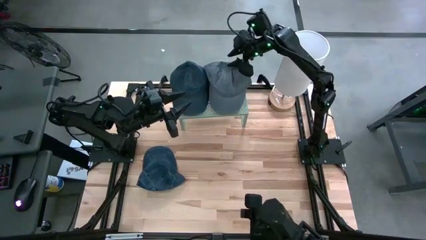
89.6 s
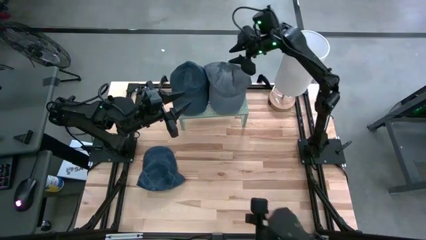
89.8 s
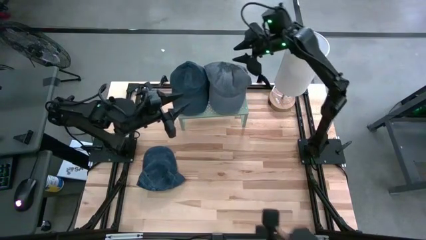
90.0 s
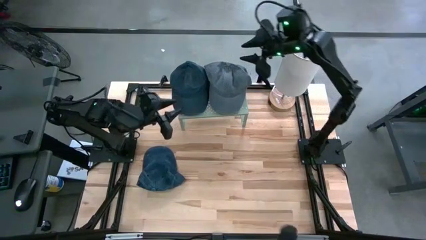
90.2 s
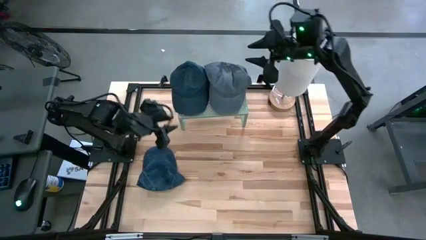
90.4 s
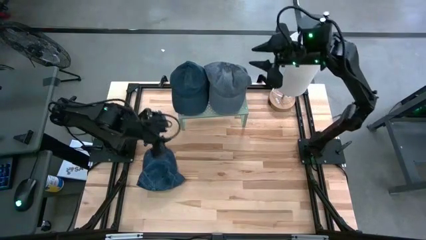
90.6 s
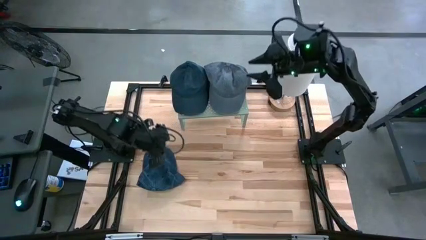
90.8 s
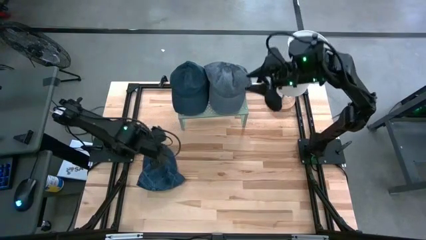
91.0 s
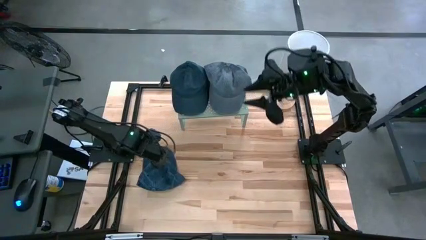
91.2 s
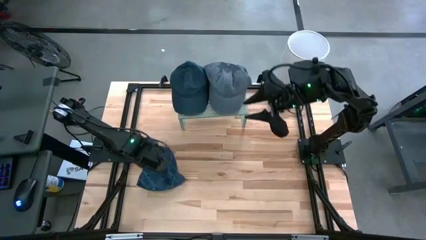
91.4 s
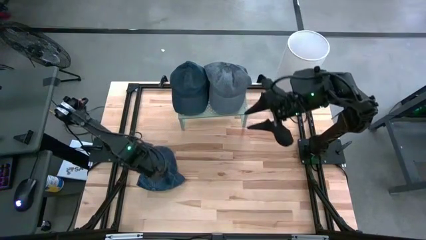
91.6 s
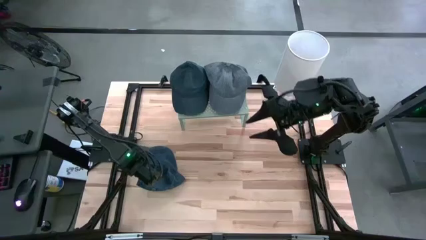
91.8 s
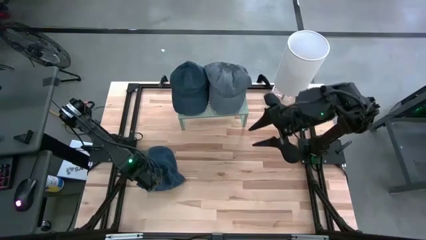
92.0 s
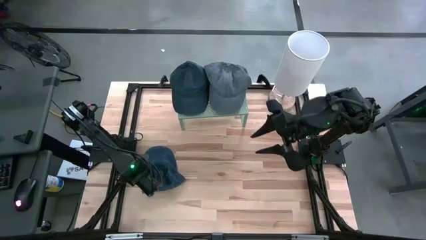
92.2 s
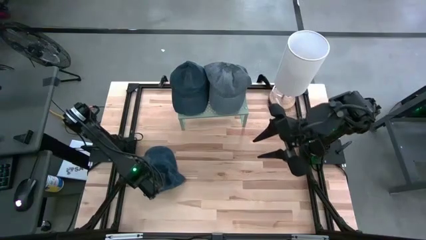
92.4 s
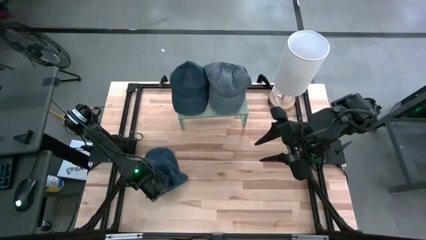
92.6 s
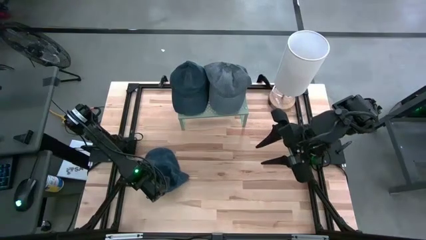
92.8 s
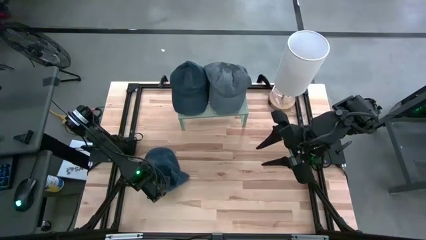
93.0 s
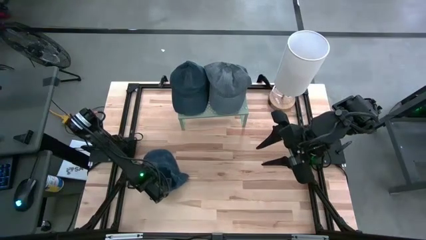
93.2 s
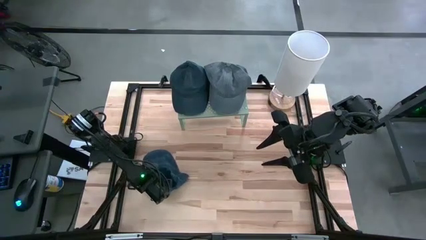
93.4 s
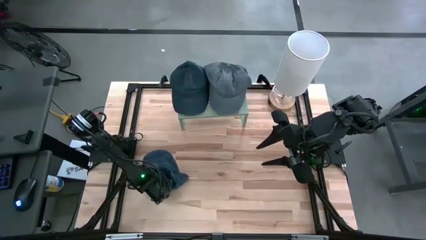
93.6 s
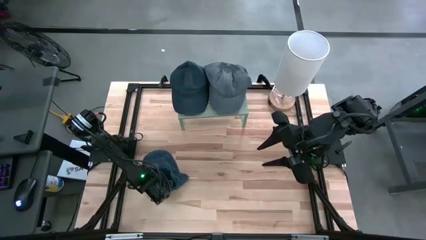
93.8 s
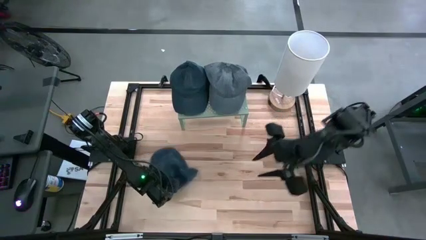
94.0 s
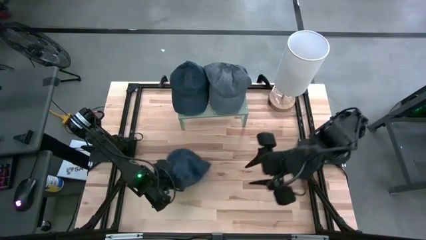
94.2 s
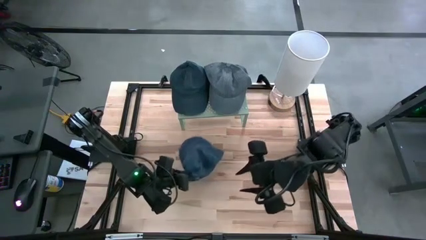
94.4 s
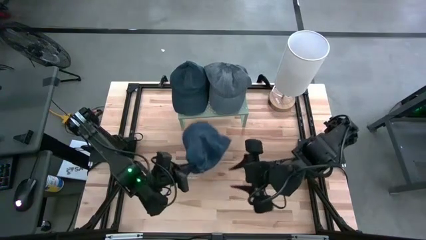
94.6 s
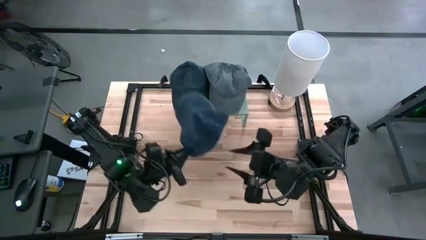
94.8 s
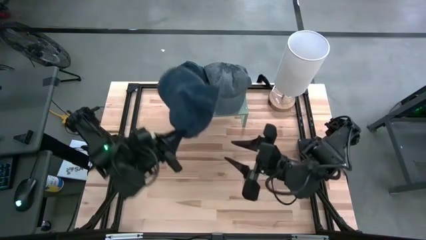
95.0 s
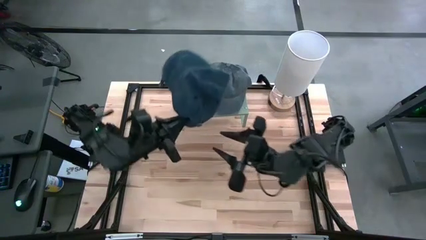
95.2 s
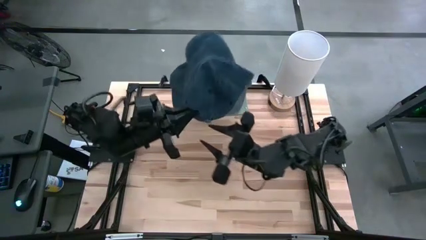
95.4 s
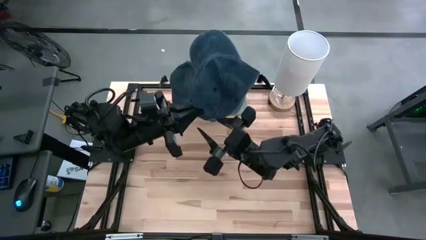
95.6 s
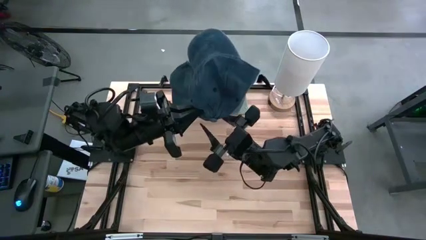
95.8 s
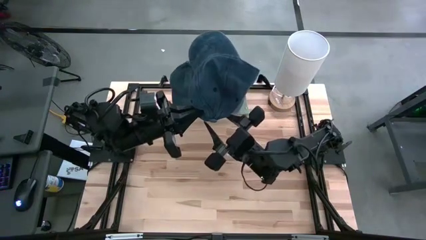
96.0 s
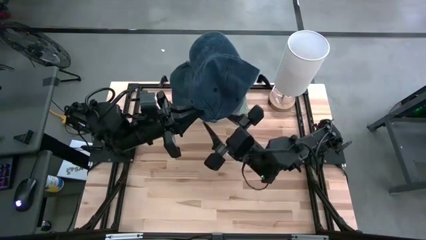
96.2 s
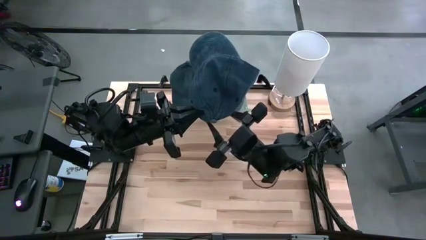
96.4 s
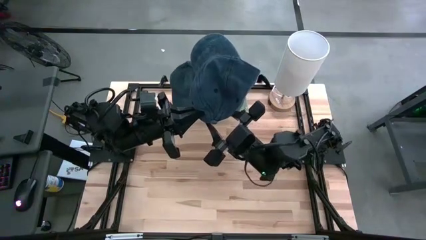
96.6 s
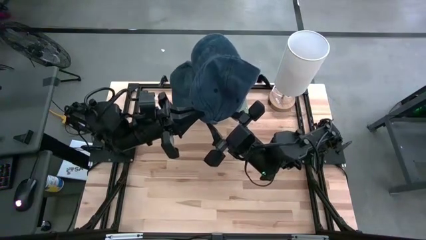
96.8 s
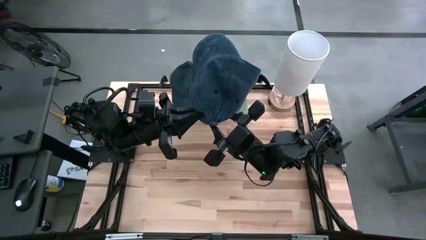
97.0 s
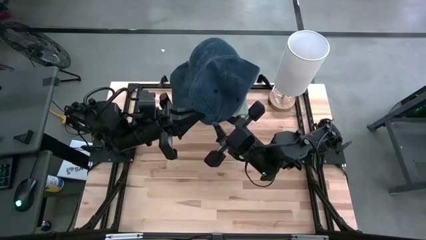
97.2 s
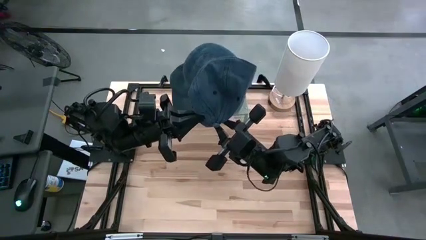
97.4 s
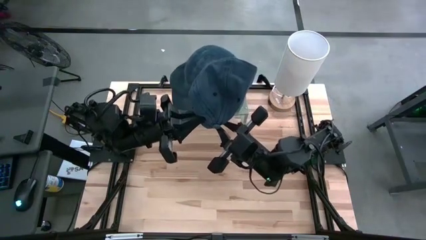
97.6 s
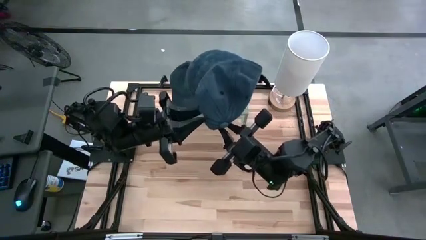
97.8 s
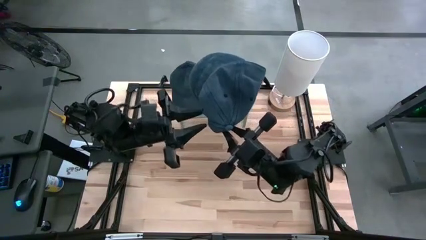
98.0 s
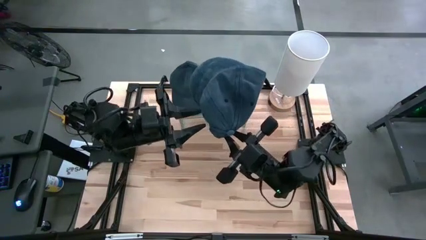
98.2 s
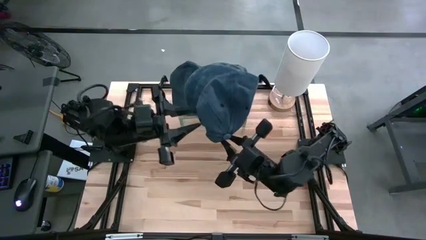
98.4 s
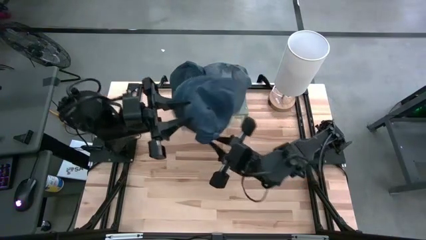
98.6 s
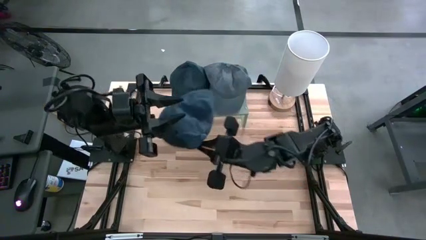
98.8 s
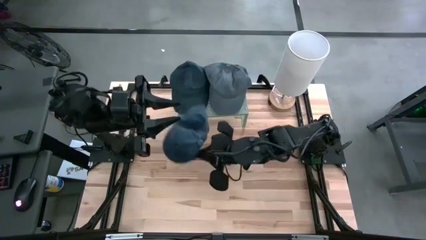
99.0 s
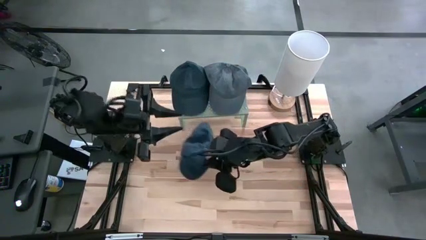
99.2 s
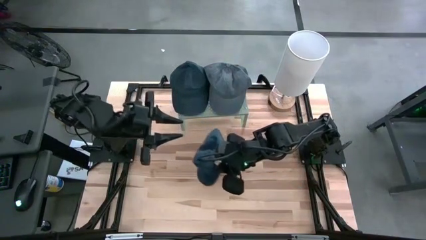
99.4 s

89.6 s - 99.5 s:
Task: Pick & Place hat
Stack the blue cap on the blue cap on the shelf

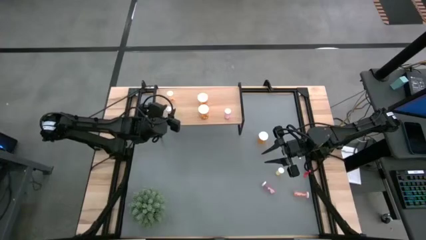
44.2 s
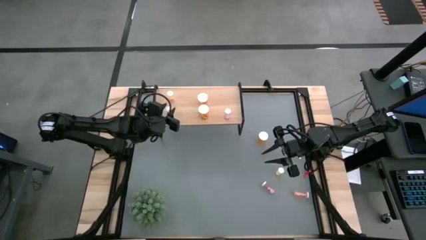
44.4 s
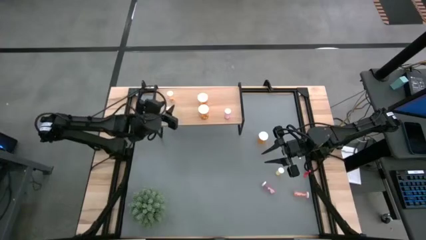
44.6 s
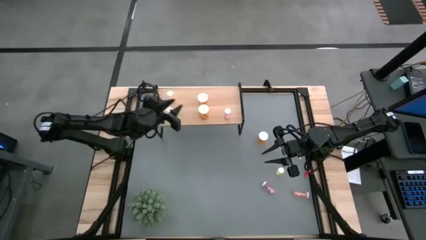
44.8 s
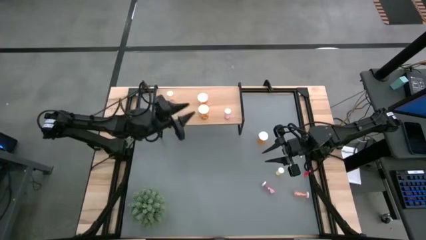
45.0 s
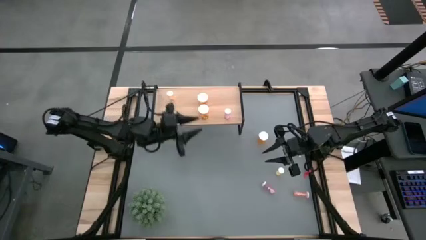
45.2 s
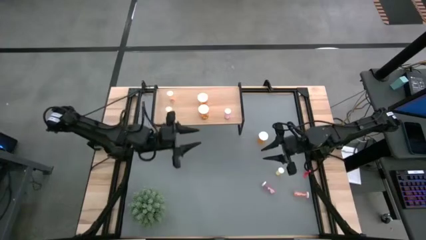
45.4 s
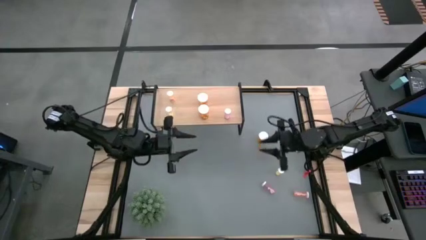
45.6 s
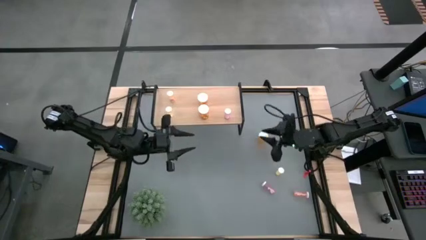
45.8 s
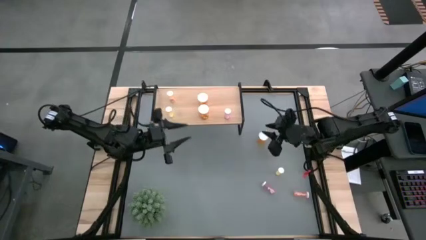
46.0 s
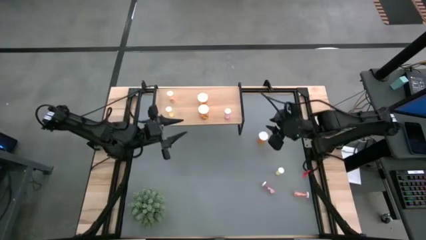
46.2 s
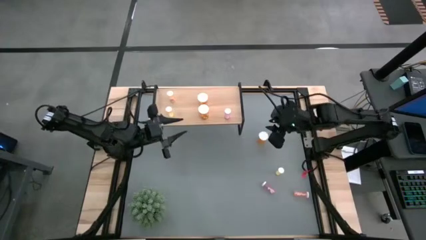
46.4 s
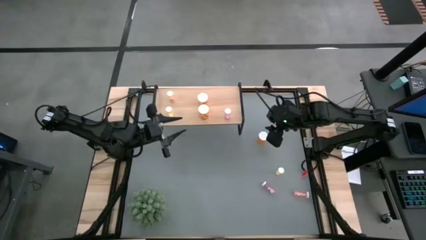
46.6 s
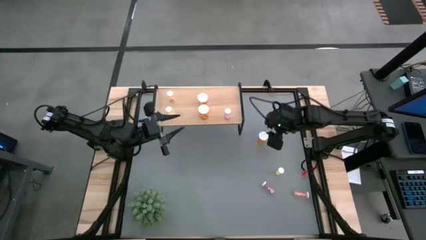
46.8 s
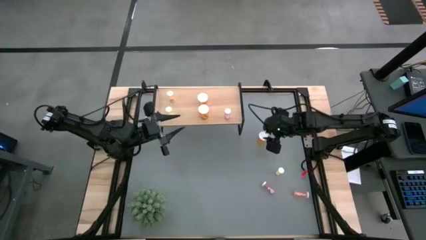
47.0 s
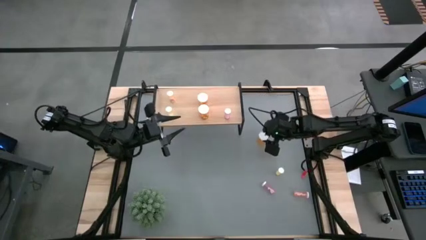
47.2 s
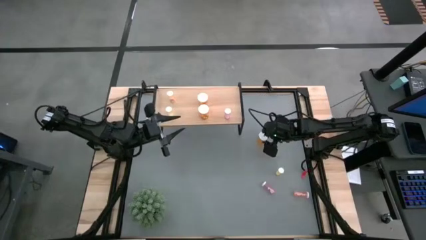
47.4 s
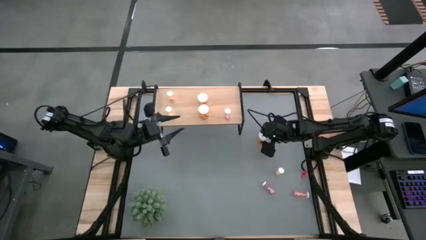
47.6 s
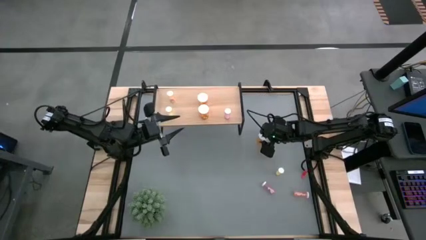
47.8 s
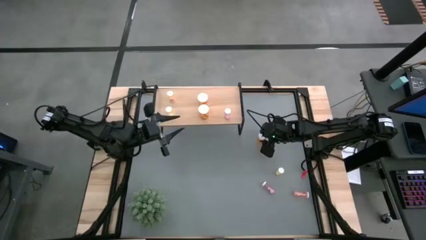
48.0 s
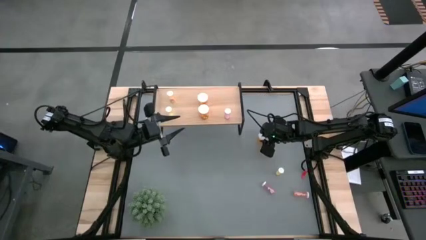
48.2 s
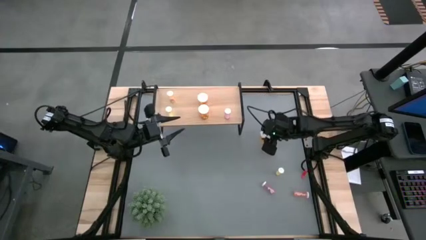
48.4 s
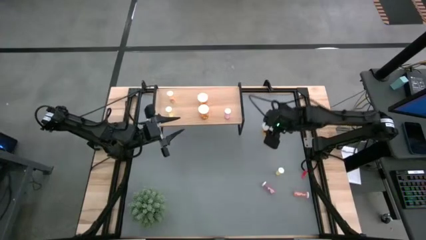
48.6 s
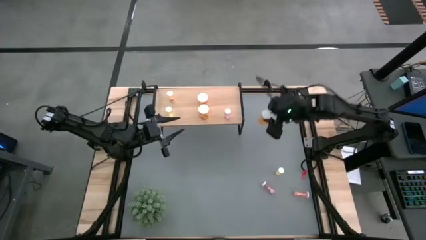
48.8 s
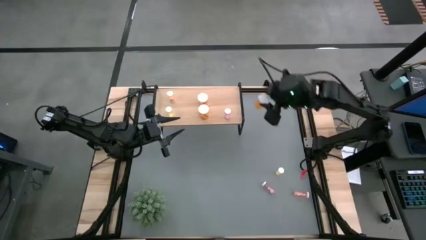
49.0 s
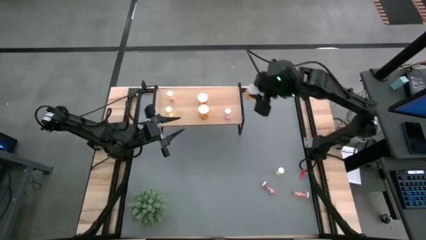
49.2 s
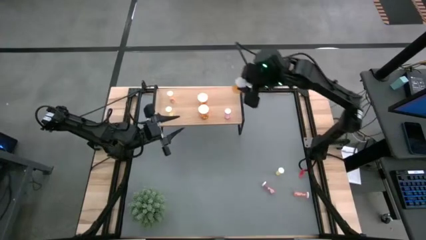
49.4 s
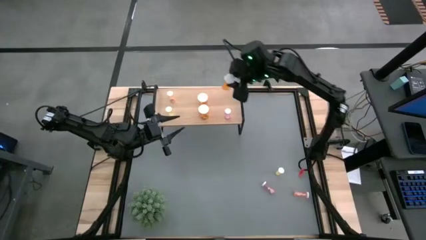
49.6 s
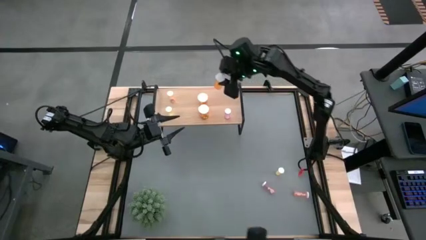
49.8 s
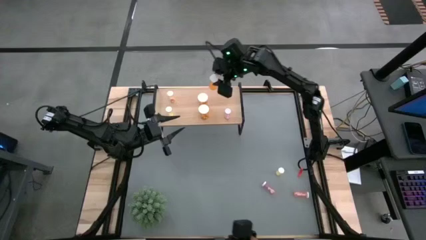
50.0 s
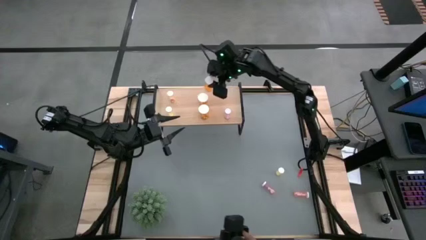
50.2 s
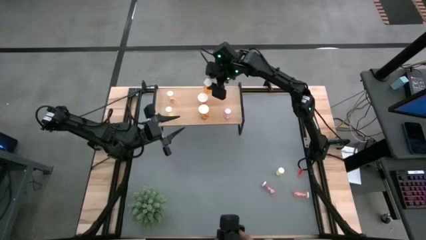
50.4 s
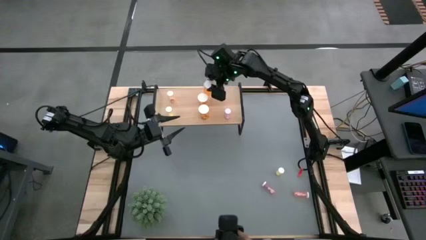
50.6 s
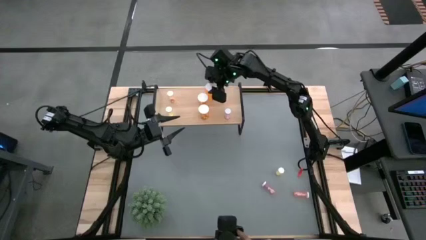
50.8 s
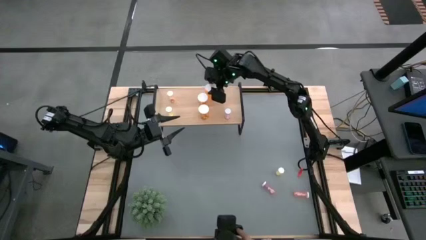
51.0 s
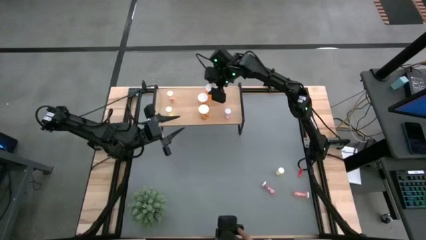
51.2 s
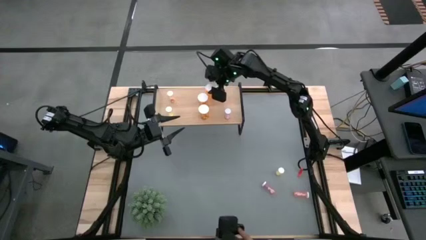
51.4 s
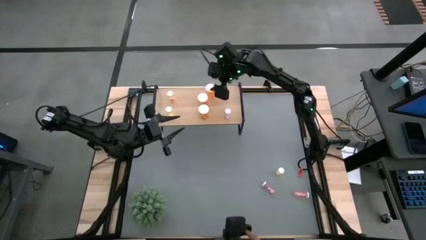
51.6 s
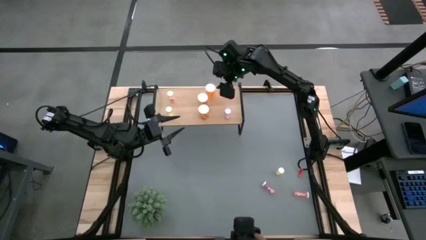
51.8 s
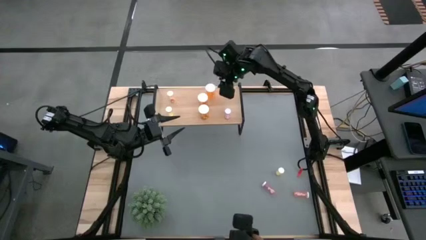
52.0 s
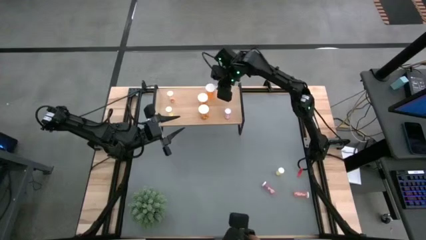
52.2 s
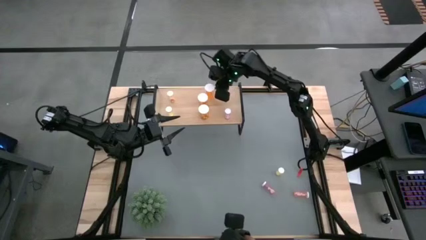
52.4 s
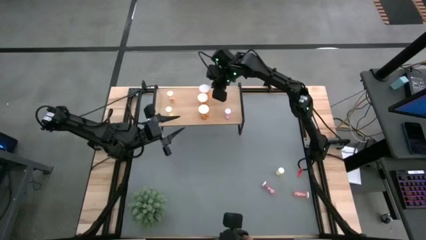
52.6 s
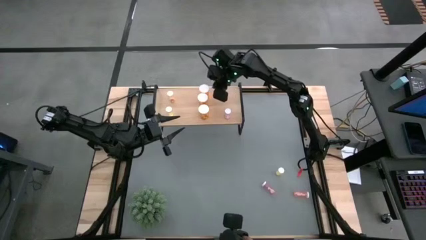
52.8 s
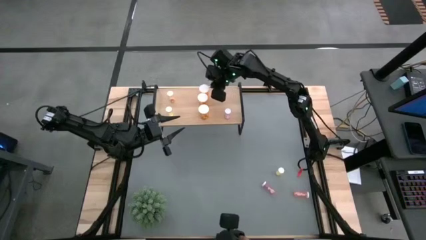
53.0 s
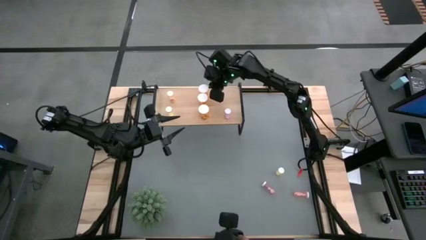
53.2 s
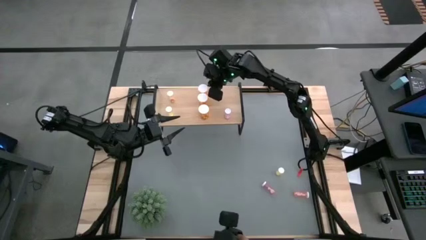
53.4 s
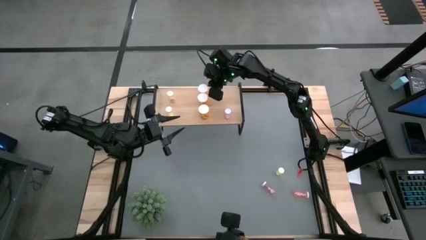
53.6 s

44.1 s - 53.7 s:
Task: Pick and place medicine bottles onto shelf by color
Put the orange pill bottle on the shelf aligned with the orange pill bottle
